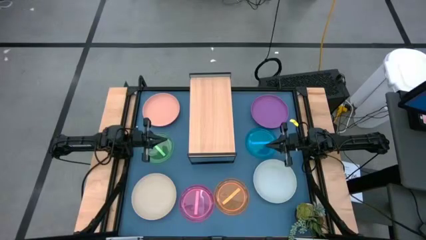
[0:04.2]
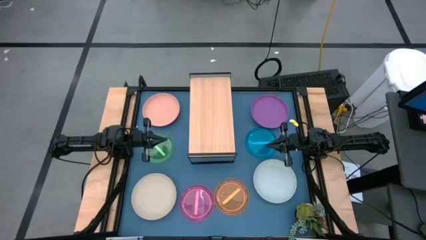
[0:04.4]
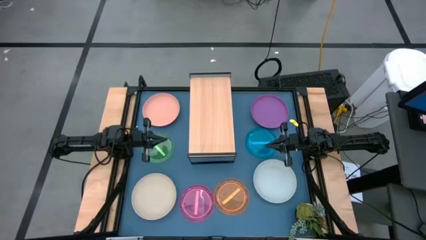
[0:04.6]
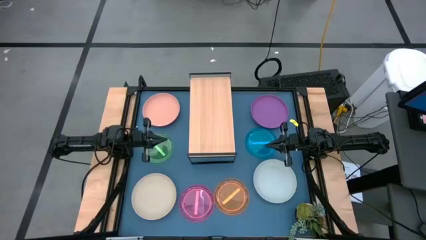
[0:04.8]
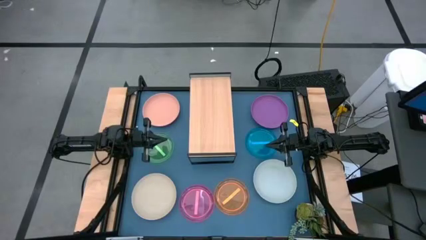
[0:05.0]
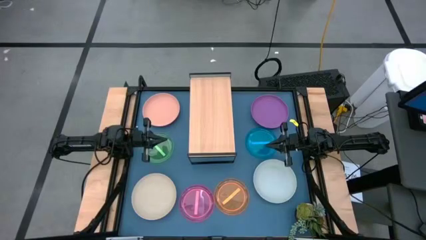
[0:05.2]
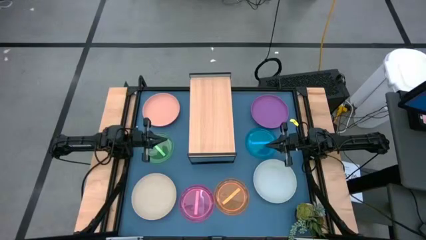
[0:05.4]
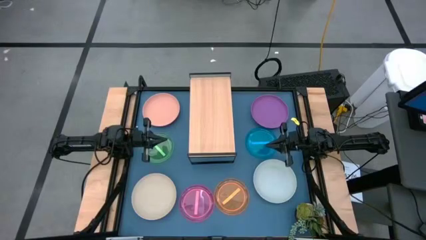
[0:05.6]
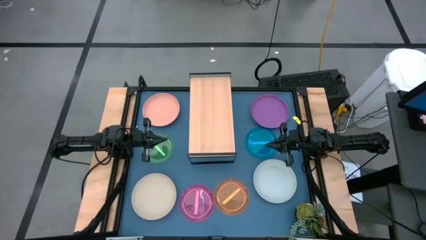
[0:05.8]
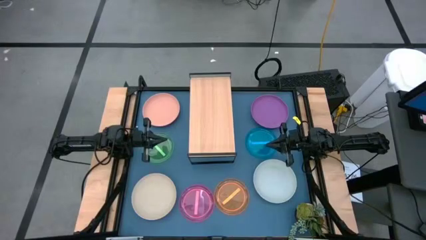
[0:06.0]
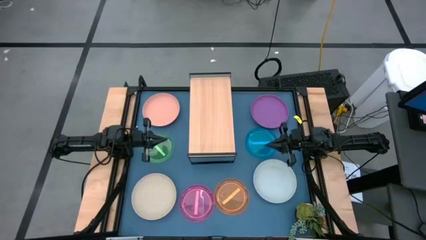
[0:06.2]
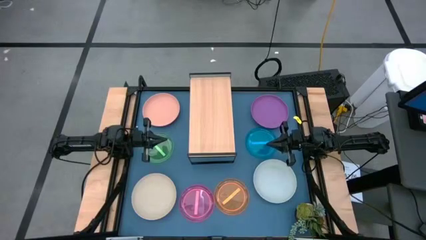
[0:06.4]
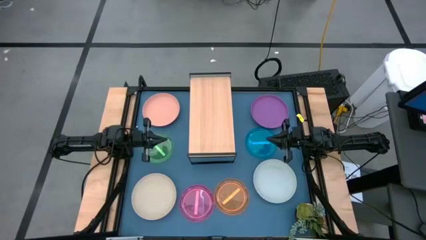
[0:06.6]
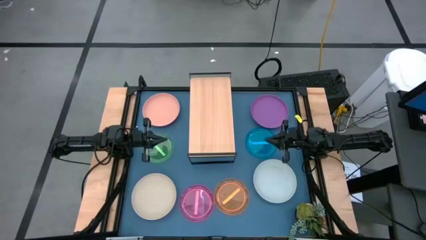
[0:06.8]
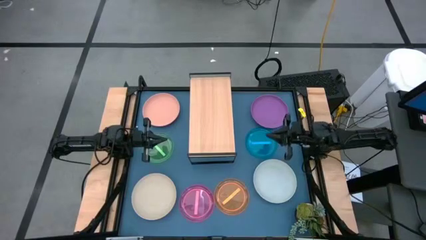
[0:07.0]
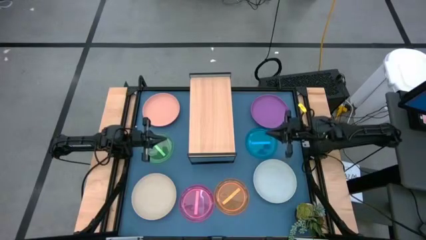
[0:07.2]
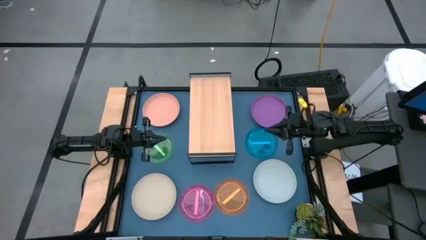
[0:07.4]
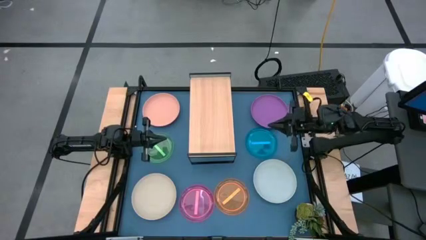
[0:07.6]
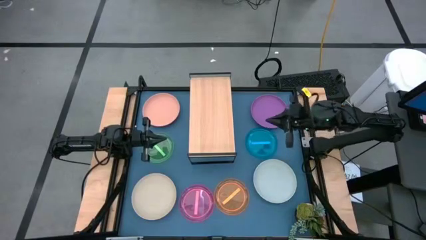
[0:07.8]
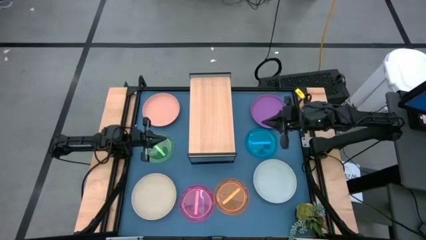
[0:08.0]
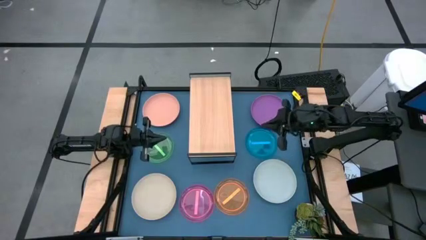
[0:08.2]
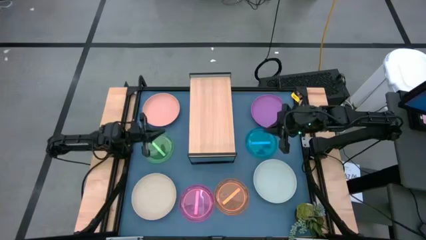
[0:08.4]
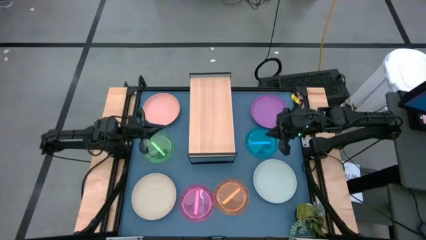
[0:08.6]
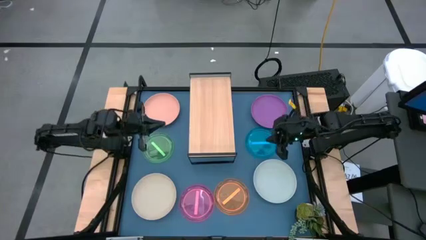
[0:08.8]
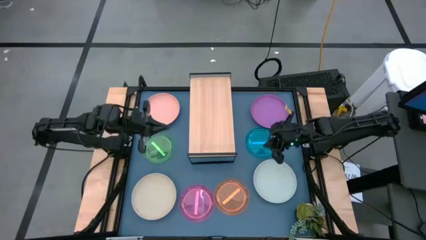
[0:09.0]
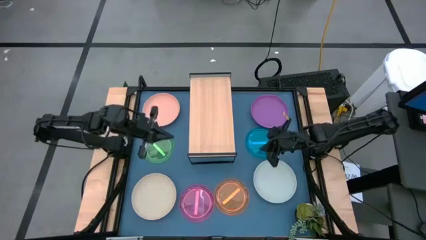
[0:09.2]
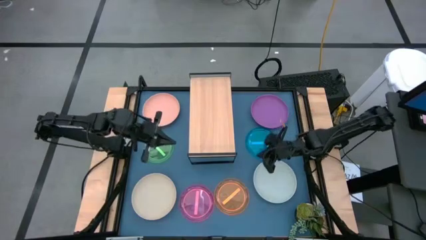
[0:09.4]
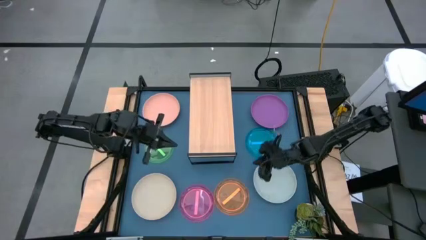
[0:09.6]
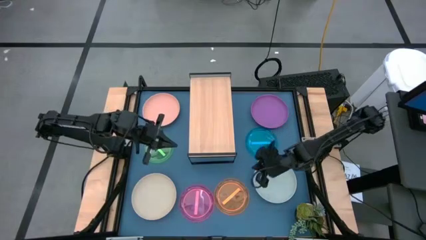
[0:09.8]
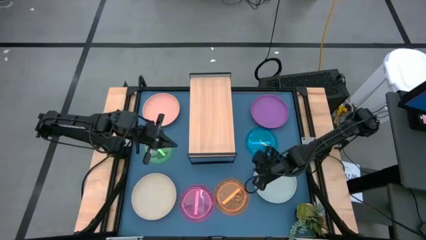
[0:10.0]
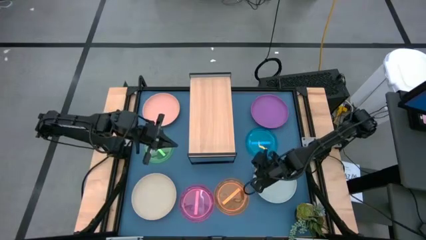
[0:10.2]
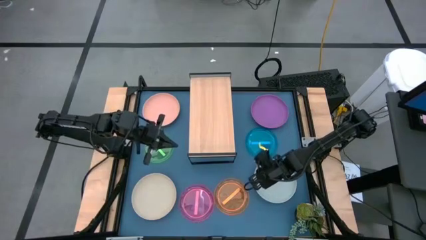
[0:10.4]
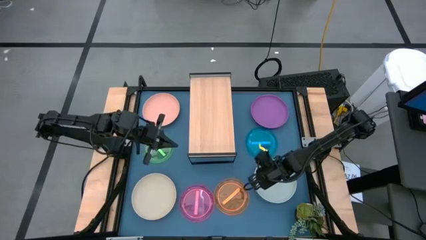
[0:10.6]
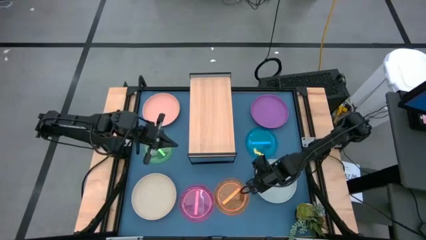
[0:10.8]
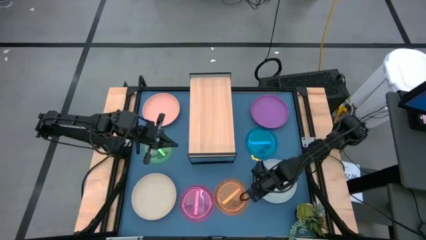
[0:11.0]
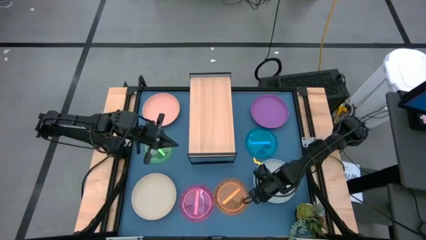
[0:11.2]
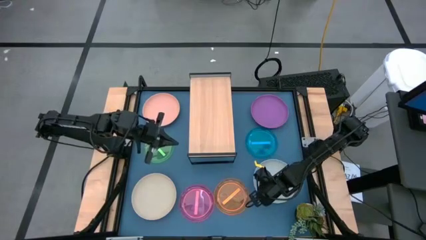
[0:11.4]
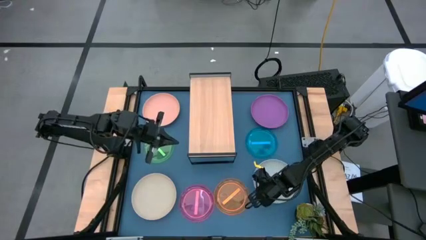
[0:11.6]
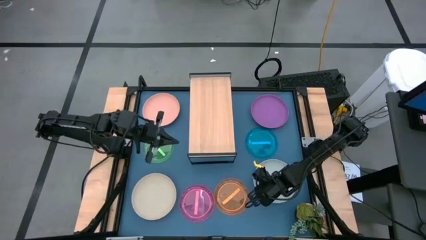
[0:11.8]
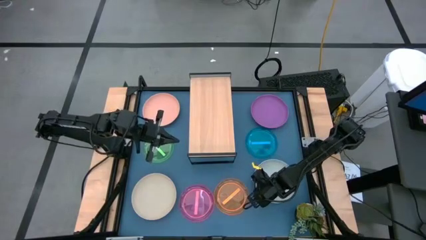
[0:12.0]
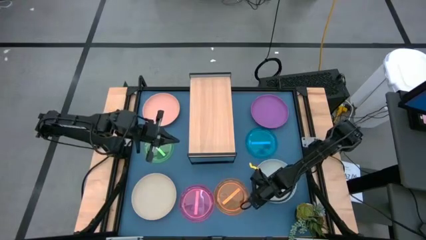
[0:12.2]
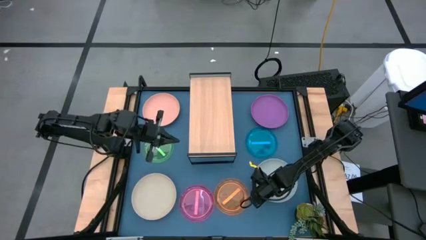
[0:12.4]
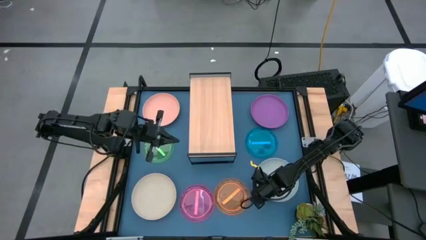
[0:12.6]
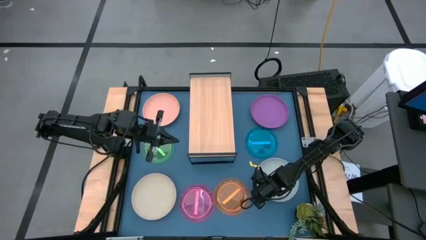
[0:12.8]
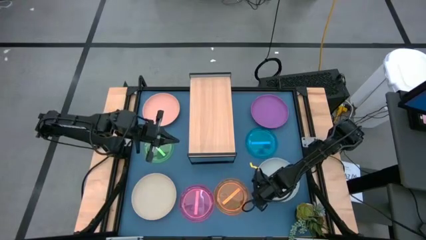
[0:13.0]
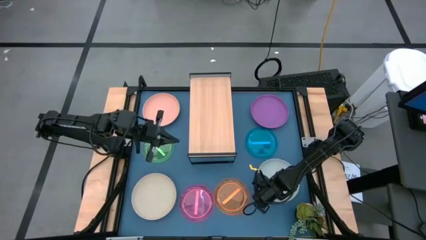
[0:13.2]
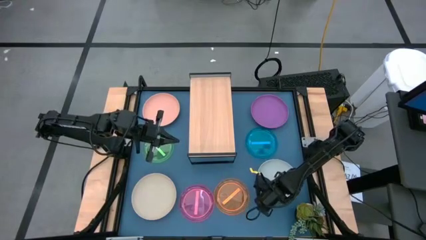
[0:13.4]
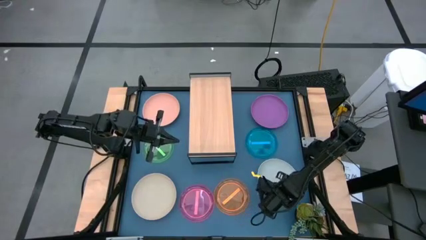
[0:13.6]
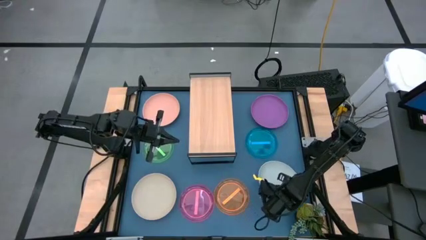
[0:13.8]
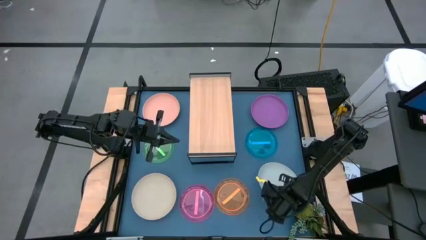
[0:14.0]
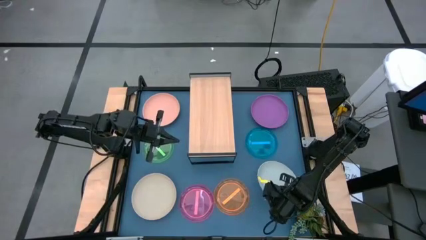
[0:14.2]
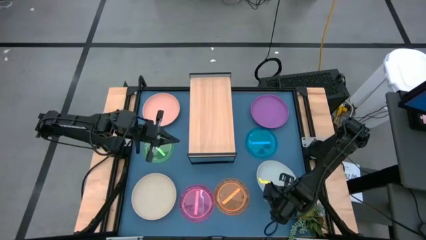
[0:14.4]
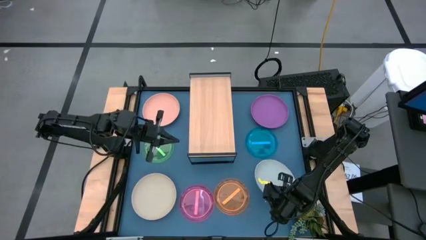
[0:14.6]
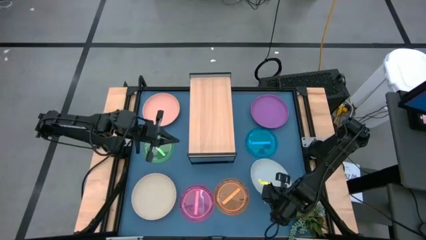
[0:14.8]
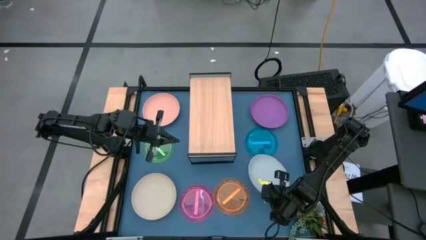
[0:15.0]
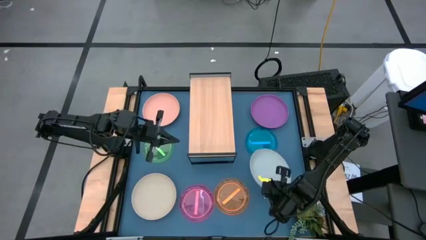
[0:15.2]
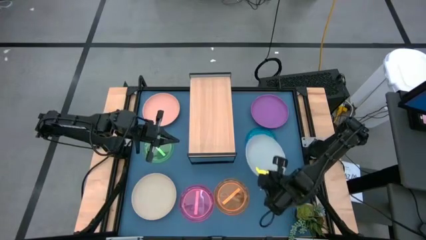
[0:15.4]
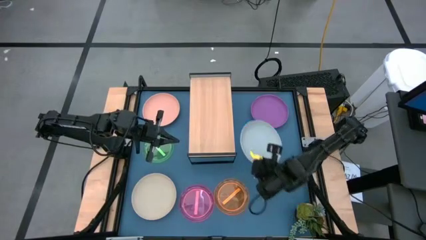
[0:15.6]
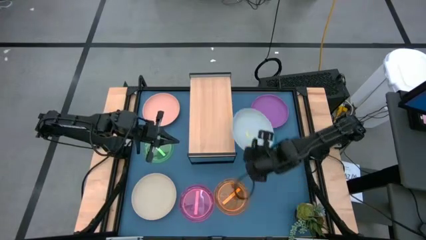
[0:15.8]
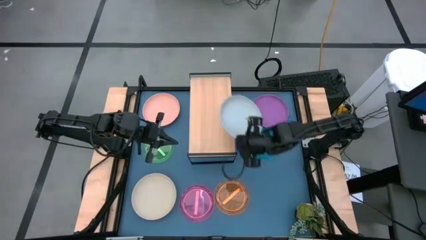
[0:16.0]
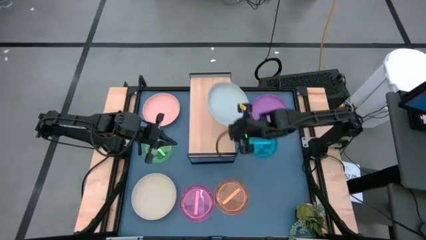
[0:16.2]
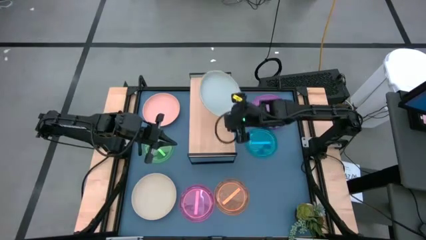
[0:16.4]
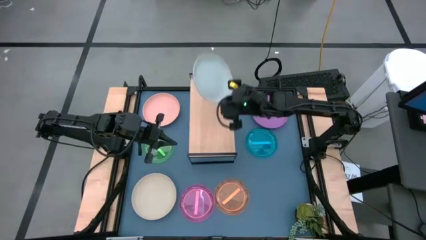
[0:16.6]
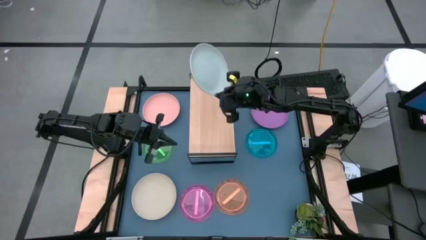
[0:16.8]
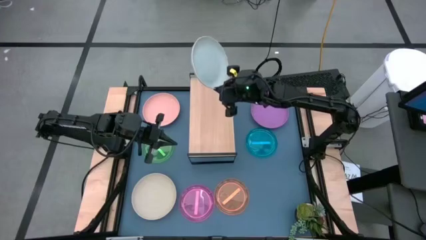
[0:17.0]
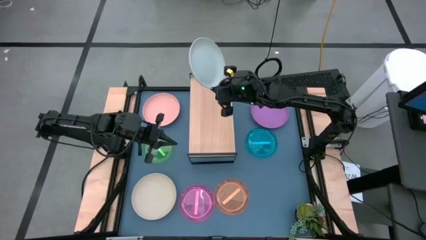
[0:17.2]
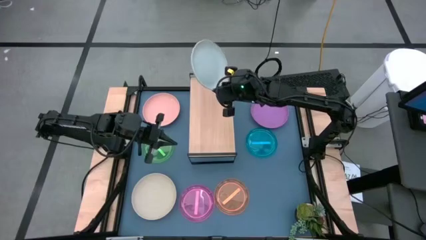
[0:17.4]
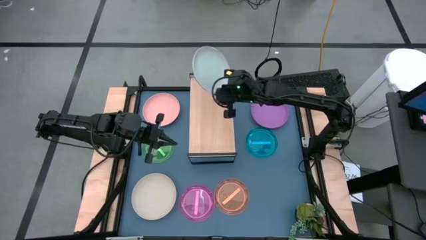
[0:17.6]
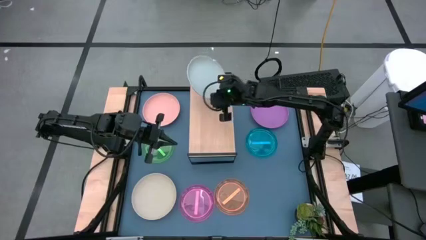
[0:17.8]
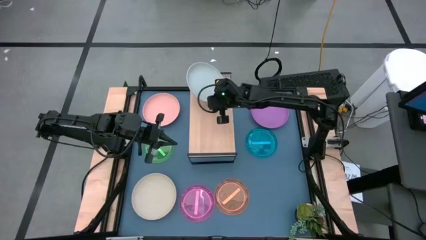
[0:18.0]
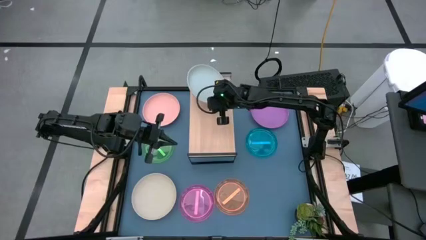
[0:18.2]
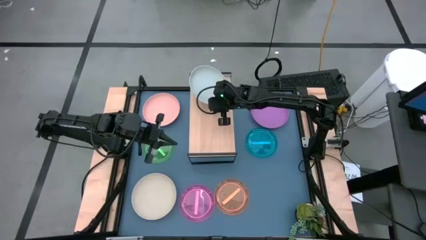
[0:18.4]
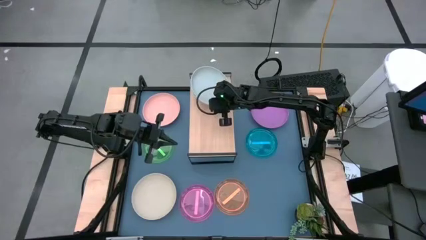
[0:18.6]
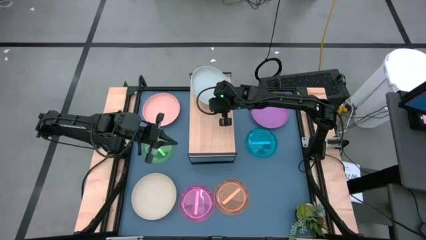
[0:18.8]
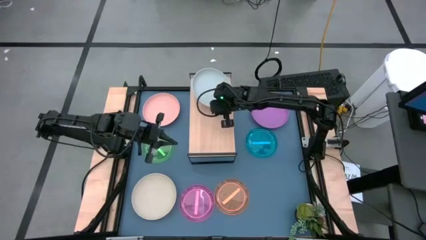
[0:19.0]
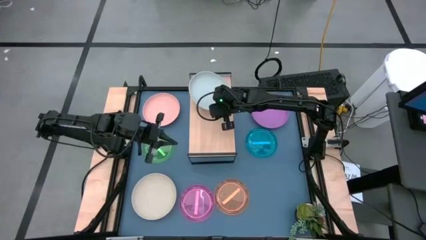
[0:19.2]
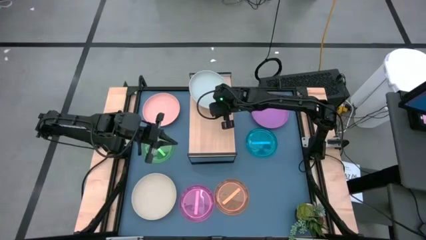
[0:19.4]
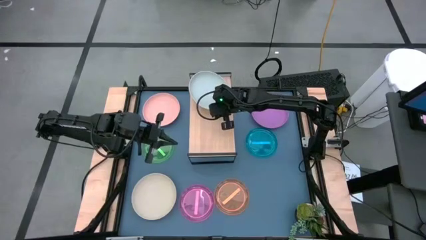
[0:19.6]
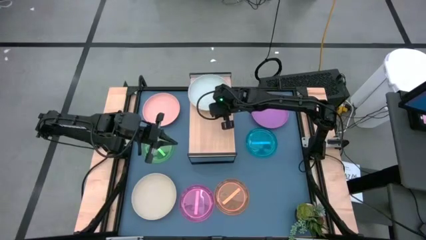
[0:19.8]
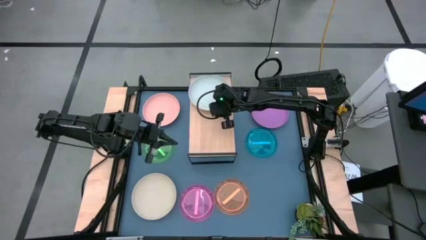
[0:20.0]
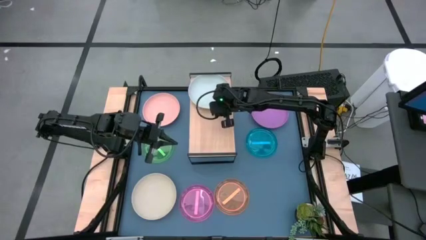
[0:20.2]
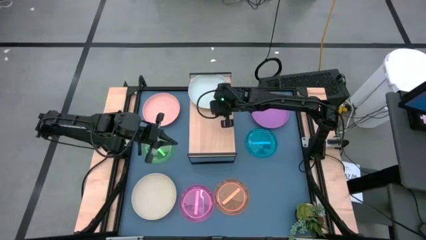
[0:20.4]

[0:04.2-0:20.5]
Task: Place and stack plates onto a shelf
Put the gray plate on the shelf
